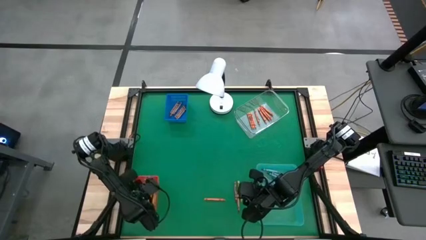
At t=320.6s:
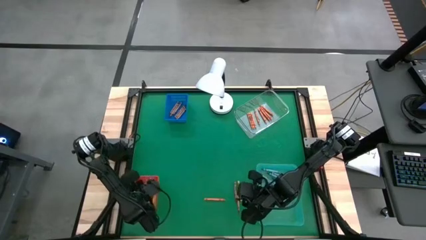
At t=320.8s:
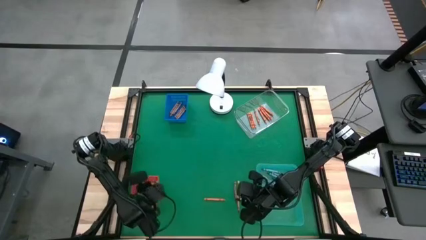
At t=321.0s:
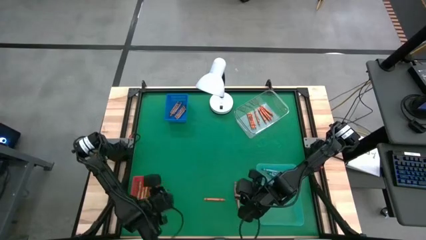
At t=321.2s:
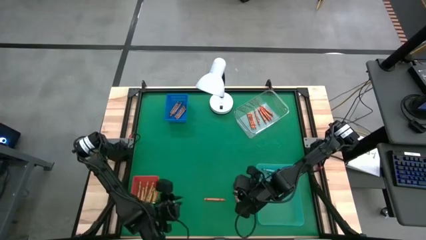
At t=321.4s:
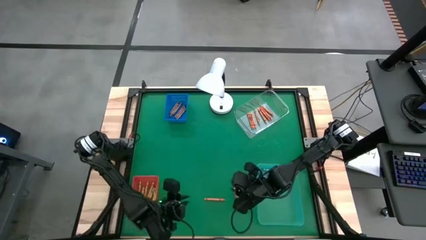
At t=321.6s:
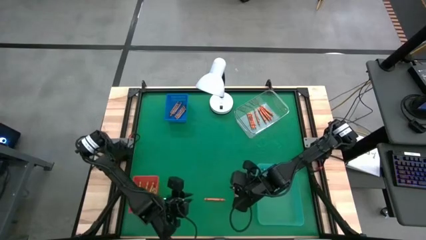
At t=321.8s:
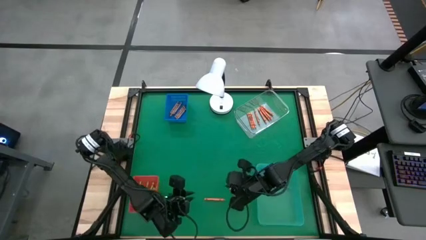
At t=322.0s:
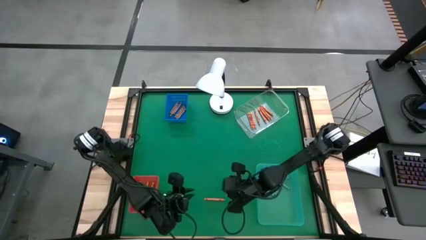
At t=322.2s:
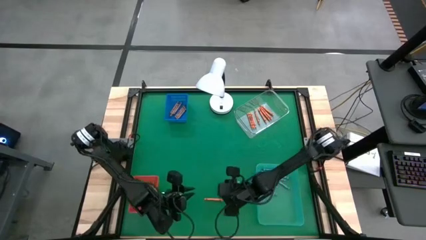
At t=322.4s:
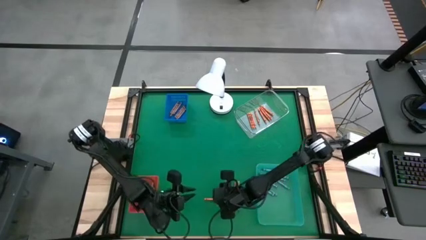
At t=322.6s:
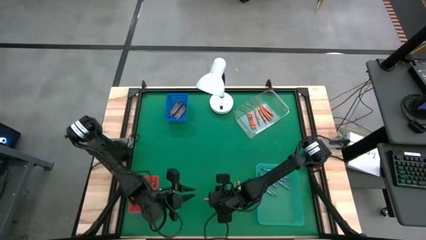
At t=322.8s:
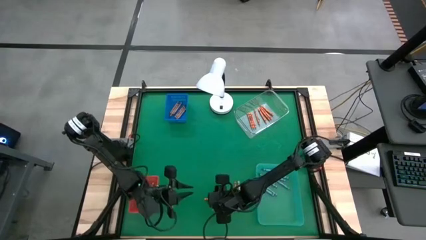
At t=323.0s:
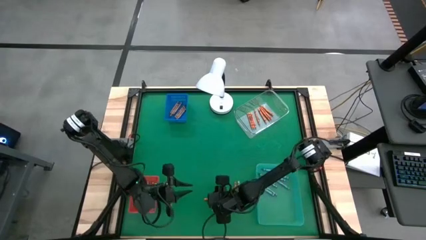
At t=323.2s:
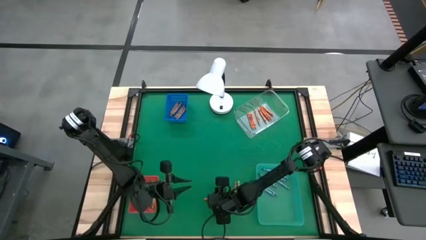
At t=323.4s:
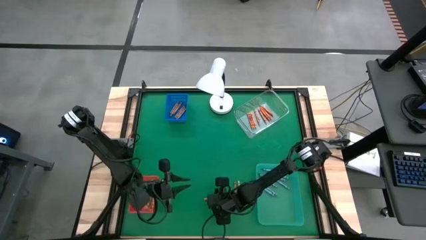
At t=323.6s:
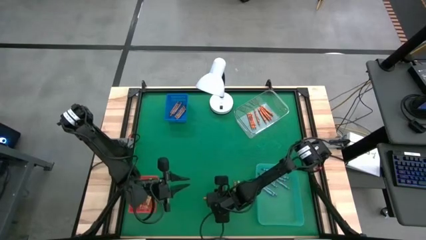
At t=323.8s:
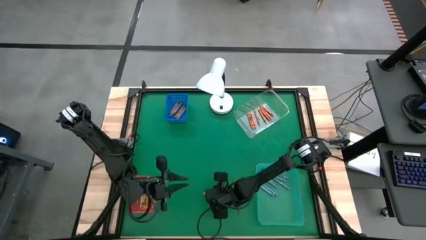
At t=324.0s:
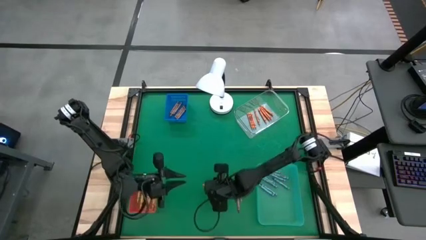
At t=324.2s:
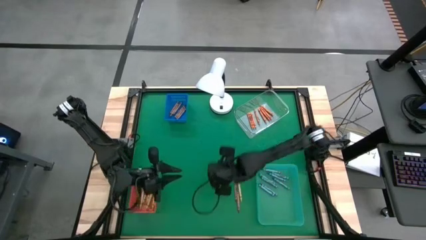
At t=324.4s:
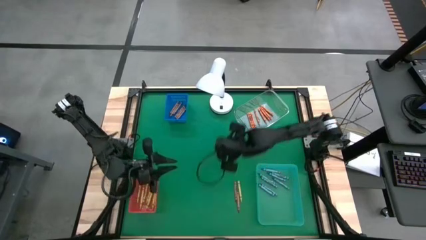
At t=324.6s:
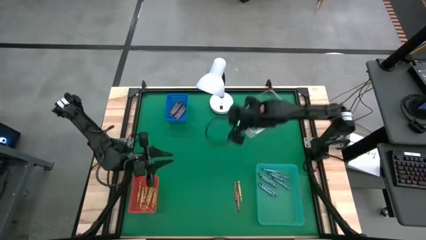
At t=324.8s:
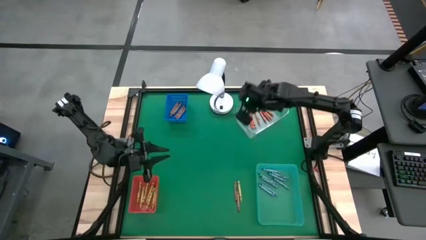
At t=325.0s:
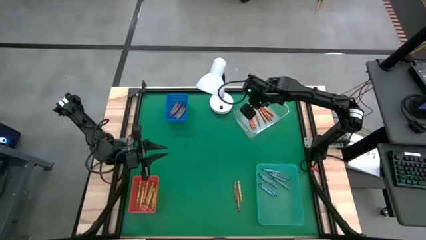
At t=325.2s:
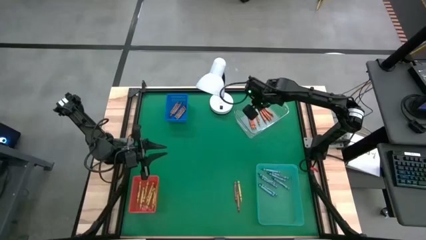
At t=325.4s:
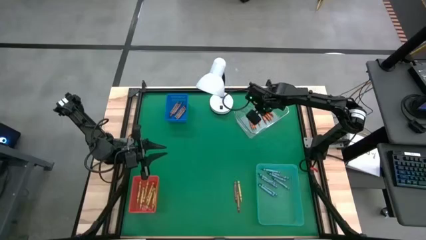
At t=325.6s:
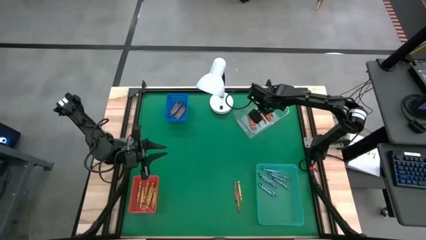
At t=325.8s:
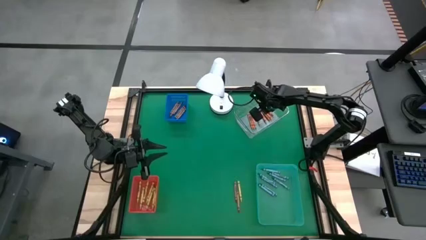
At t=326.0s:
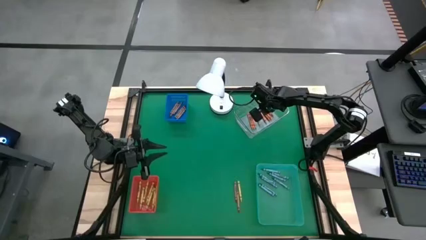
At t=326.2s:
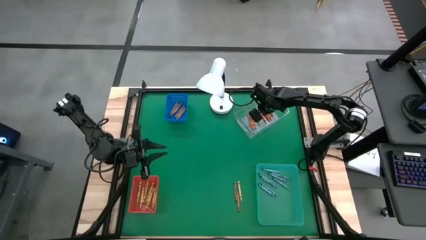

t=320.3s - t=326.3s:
Task: Sort crayons
Put the orange crayon into the transparent bin

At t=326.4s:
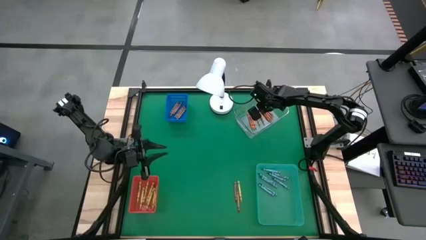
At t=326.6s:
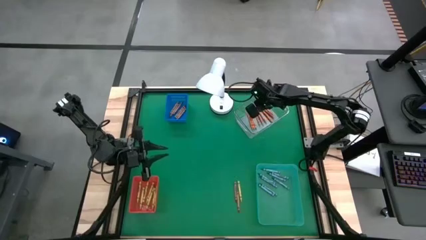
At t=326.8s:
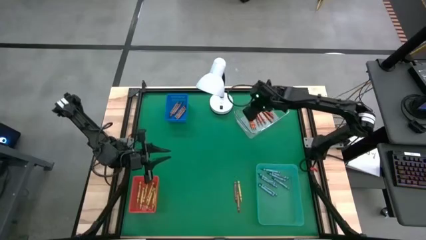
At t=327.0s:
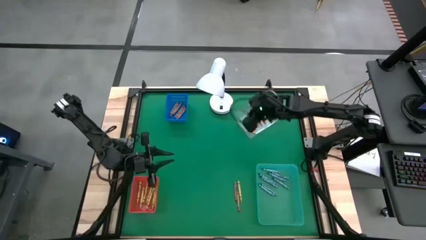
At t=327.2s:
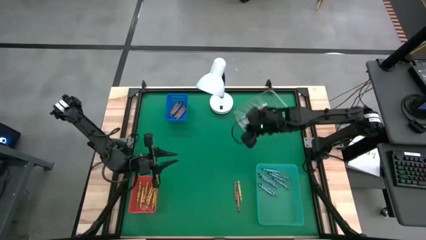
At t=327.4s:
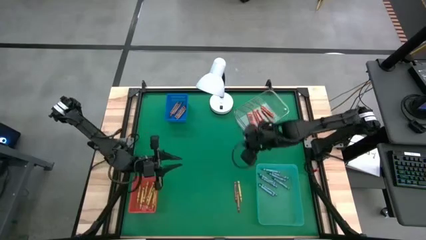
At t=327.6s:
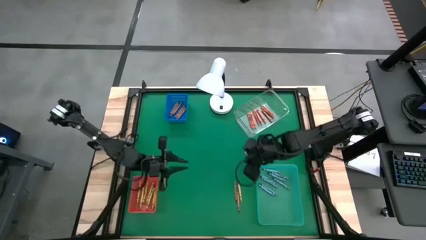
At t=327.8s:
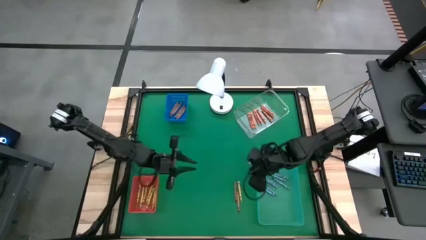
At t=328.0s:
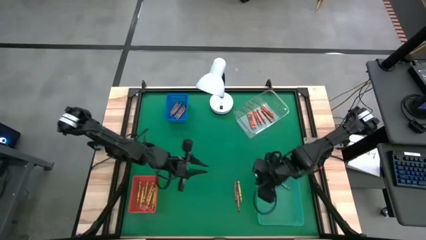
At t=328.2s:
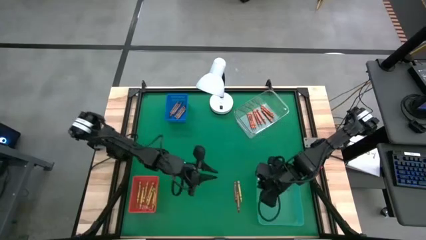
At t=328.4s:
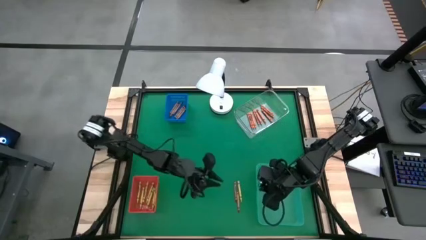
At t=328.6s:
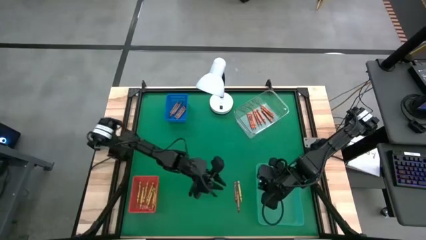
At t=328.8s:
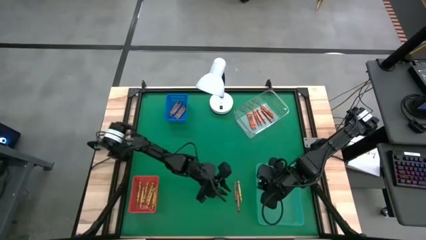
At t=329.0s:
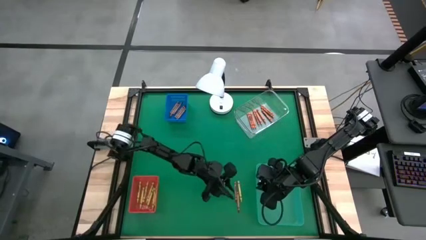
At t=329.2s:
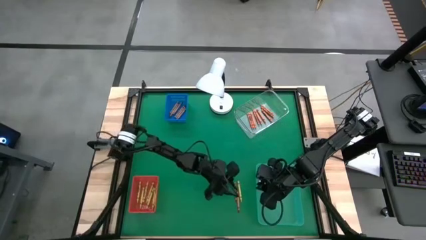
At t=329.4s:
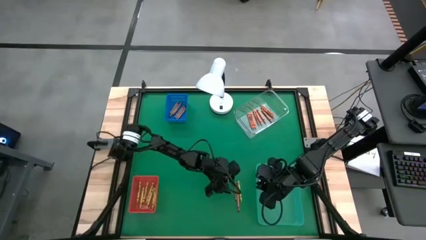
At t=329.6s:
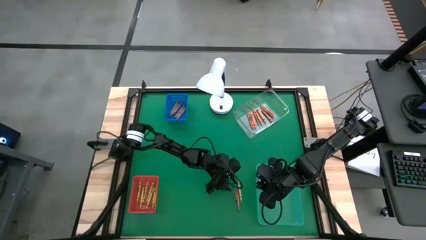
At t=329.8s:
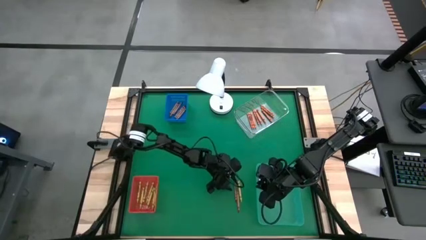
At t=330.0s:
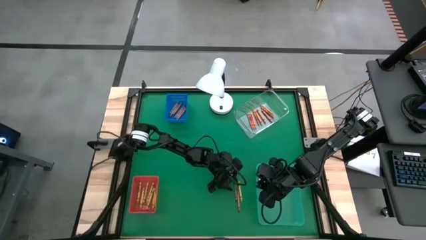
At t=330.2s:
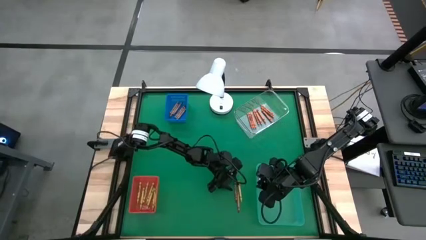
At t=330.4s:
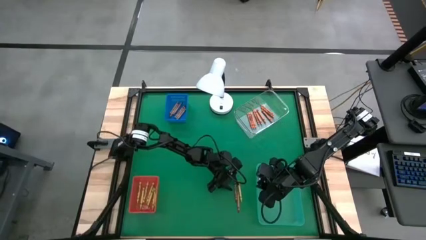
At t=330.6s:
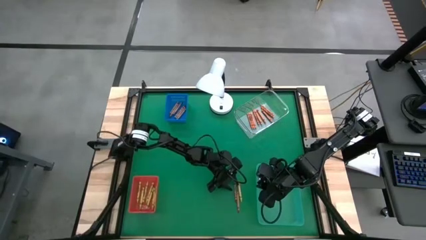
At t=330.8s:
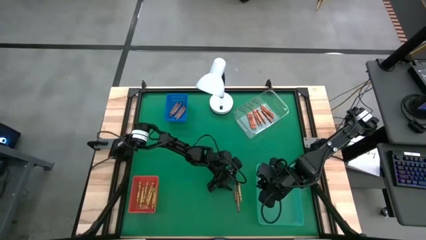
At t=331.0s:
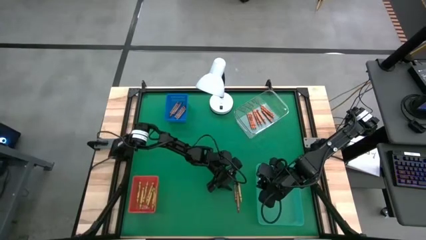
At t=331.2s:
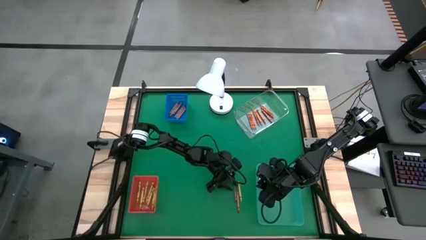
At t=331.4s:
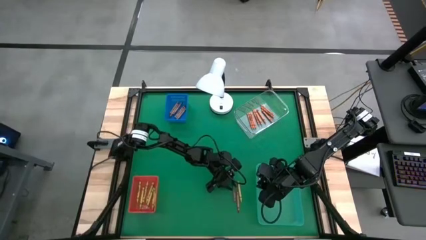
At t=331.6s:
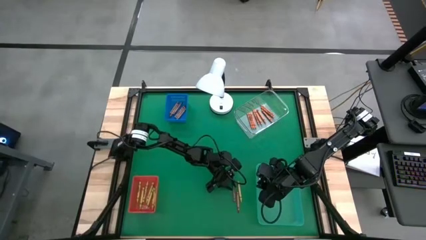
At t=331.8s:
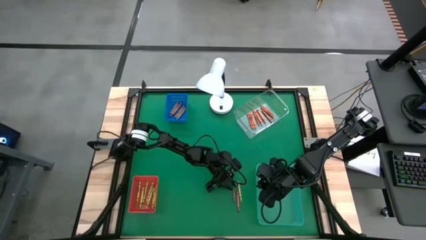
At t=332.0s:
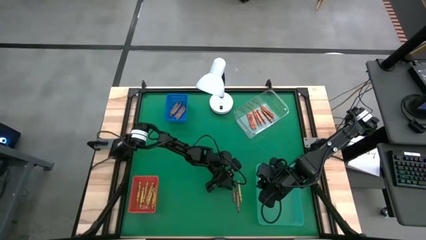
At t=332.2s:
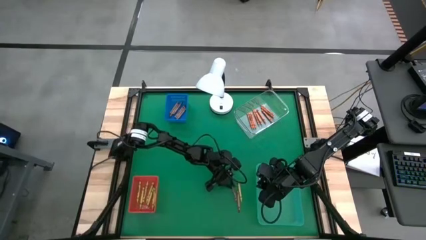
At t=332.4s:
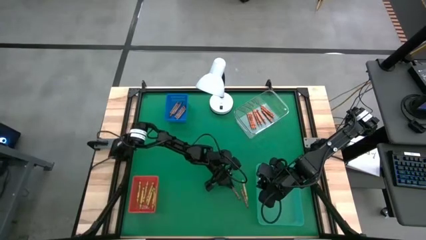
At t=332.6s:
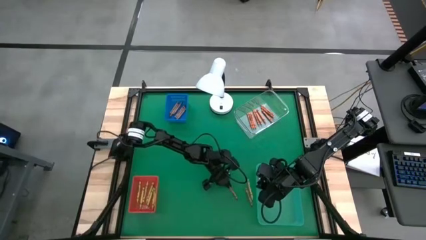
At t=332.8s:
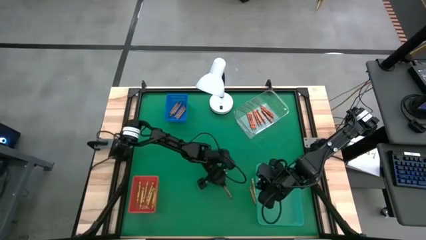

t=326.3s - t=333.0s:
Put the brown crayon into the blue bin

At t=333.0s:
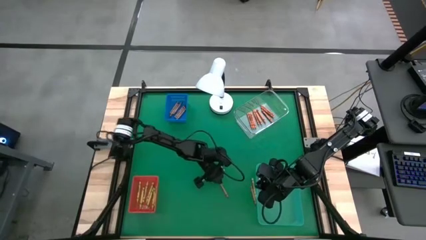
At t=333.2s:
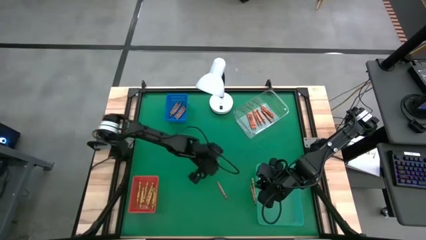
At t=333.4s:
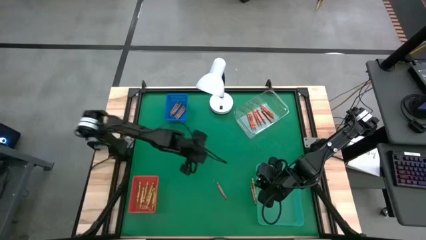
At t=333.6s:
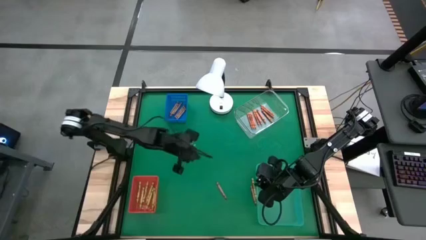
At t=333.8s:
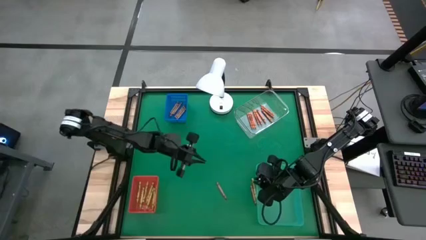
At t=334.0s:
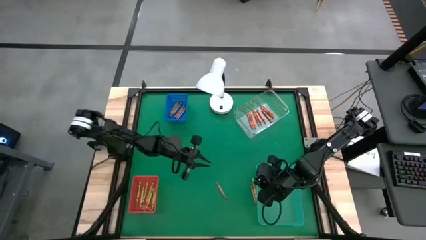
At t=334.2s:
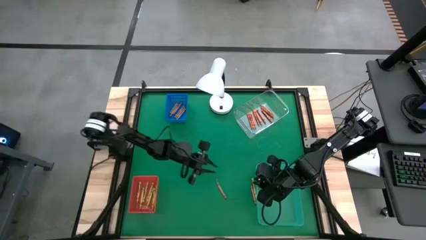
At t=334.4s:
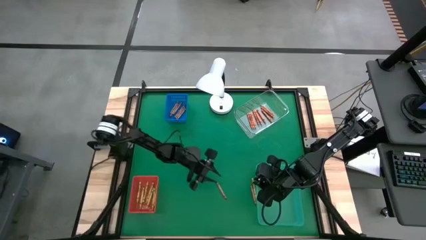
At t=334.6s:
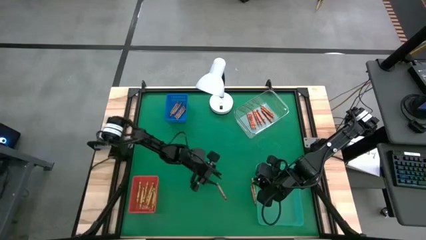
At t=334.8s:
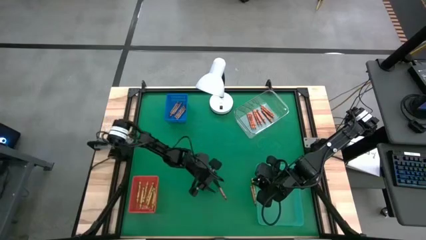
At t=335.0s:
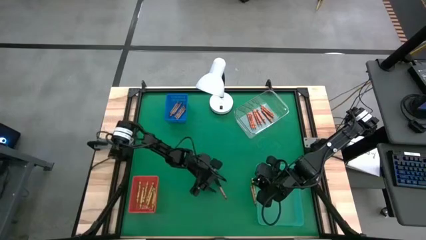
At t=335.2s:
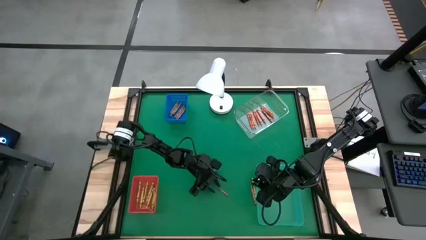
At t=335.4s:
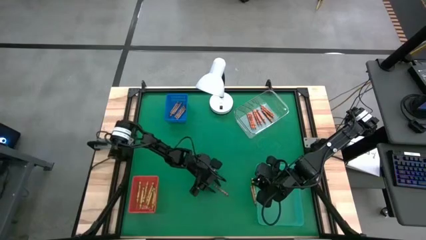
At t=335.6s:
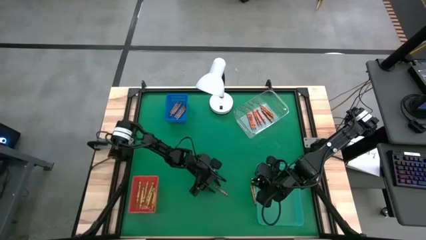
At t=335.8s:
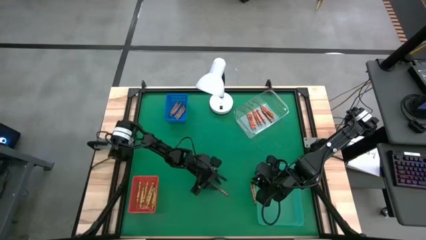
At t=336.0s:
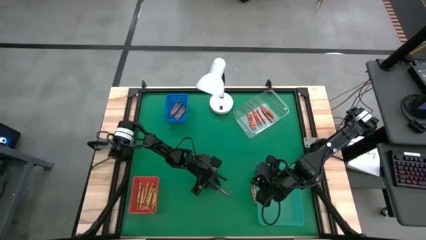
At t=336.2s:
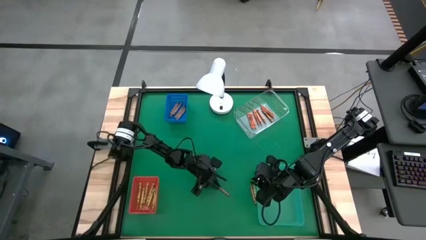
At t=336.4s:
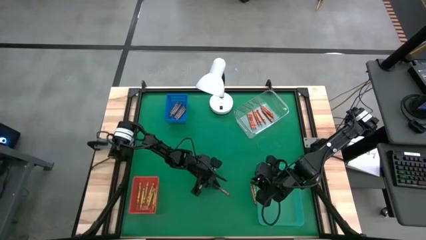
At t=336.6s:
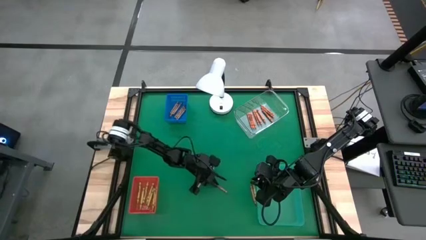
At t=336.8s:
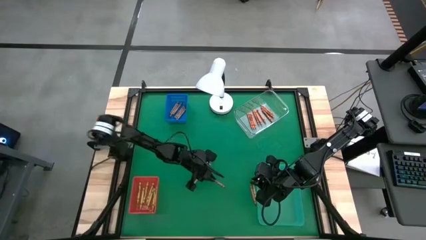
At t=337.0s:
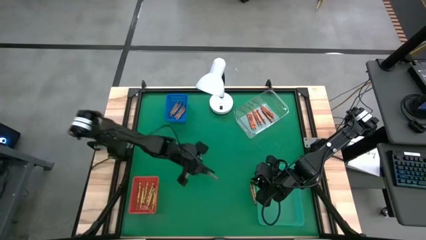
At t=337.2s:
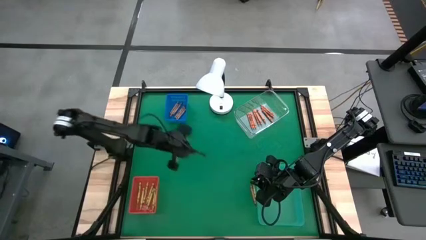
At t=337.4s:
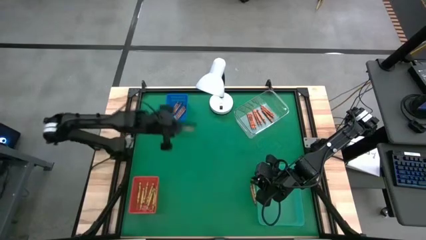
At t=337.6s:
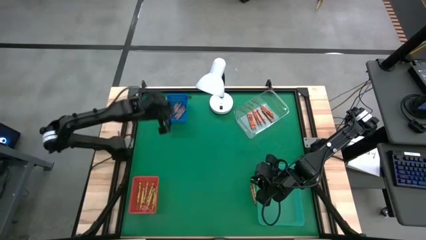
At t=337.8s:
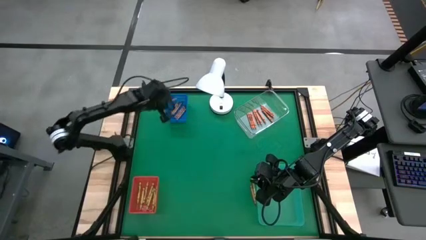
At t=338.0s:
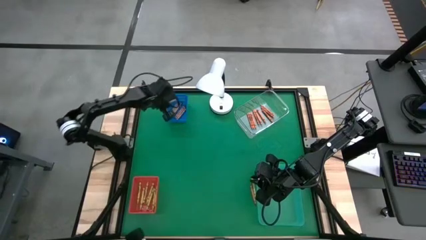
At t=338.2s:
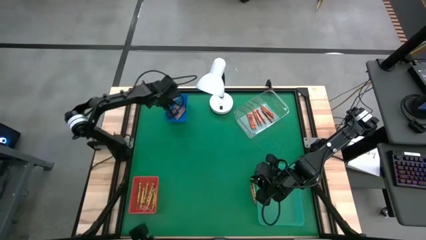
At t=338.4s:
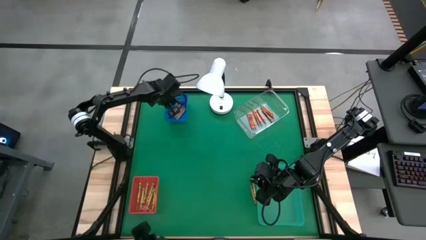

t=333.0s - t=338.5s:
Put the brown crayon into the blue bin
